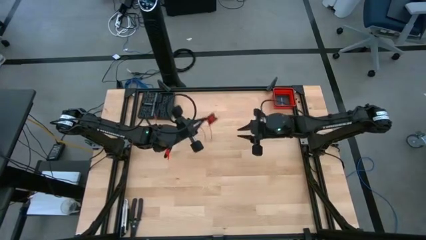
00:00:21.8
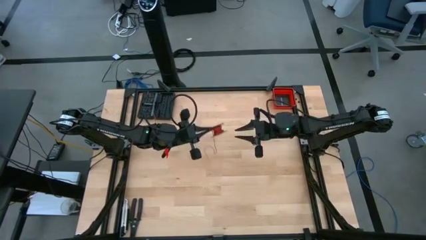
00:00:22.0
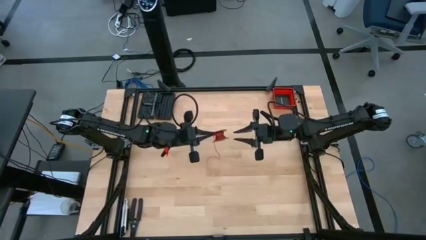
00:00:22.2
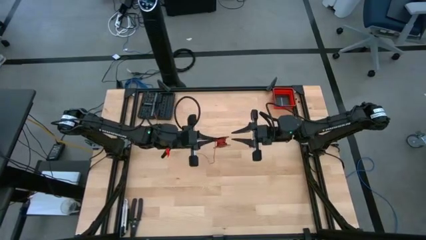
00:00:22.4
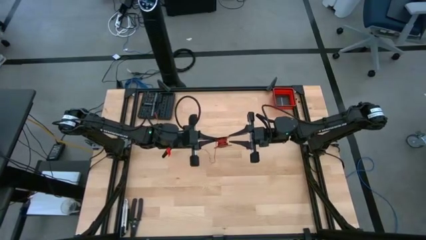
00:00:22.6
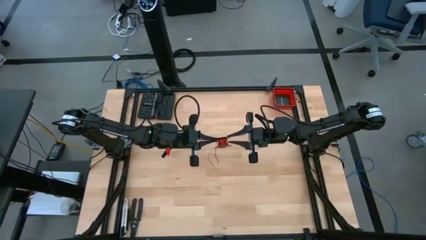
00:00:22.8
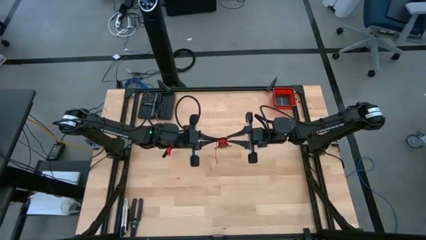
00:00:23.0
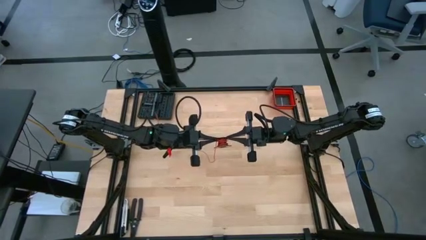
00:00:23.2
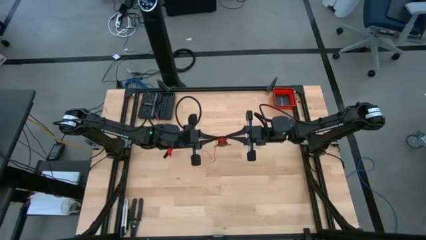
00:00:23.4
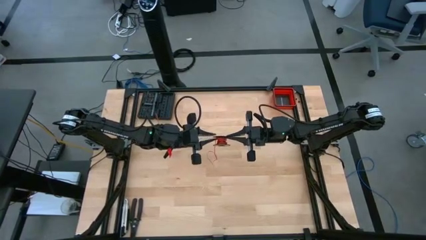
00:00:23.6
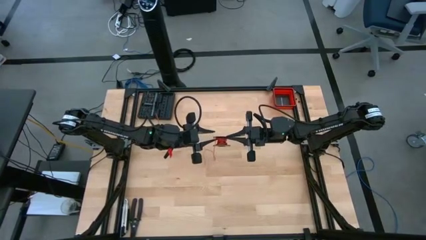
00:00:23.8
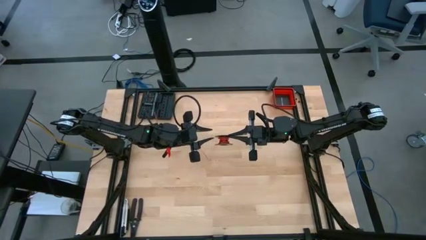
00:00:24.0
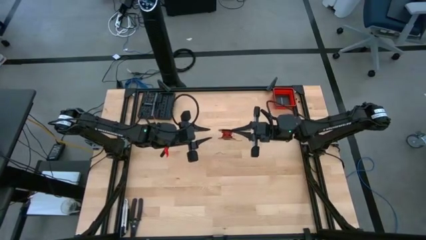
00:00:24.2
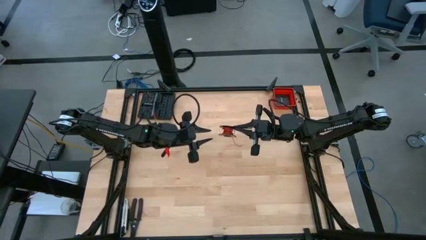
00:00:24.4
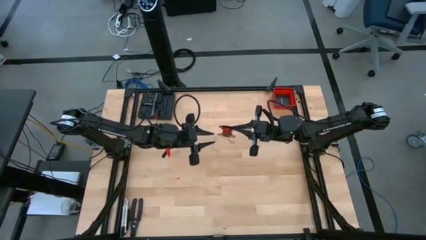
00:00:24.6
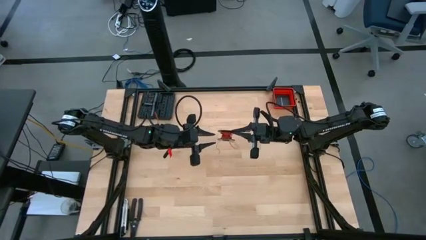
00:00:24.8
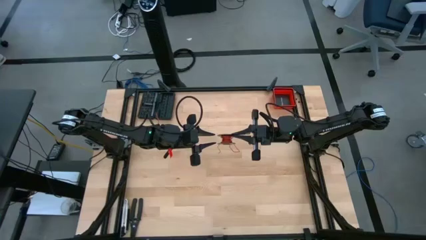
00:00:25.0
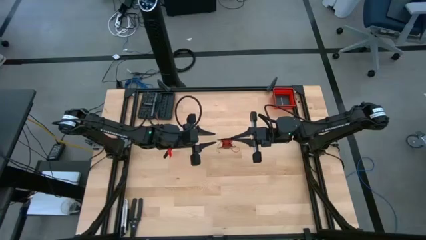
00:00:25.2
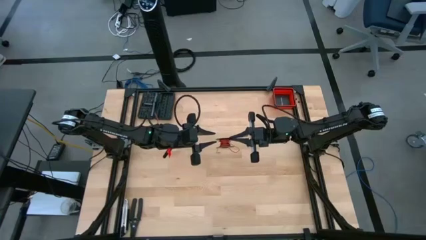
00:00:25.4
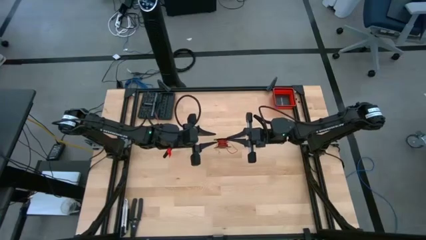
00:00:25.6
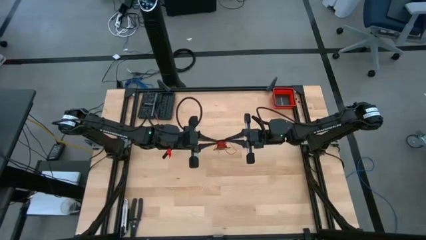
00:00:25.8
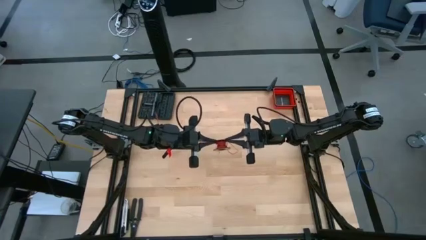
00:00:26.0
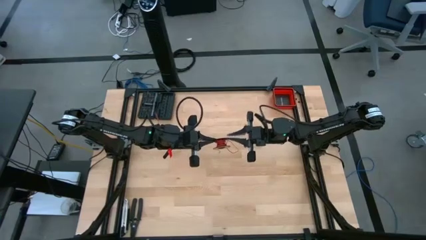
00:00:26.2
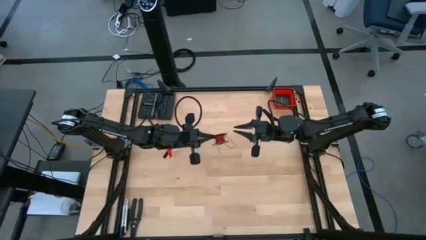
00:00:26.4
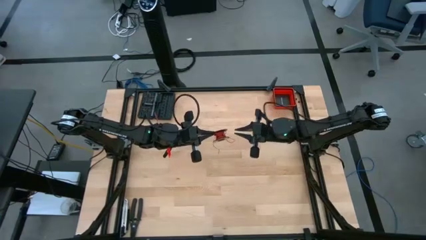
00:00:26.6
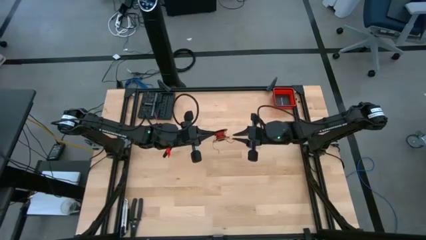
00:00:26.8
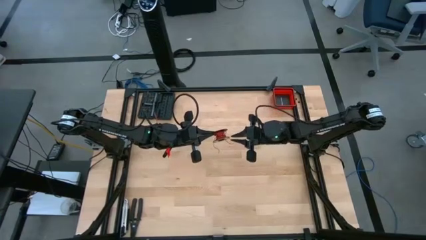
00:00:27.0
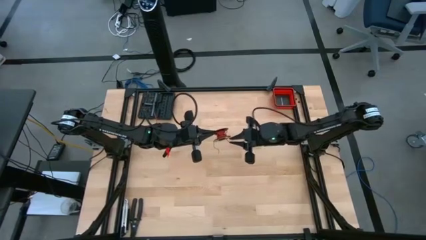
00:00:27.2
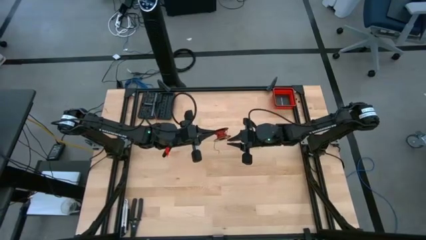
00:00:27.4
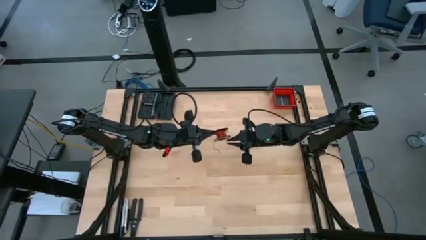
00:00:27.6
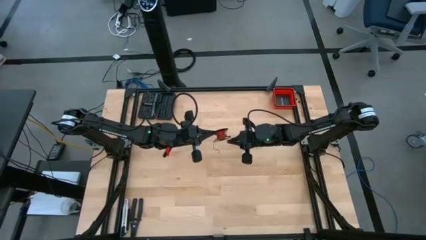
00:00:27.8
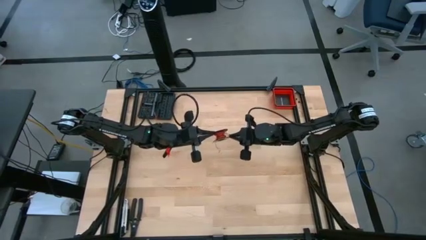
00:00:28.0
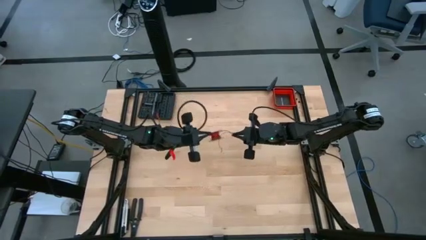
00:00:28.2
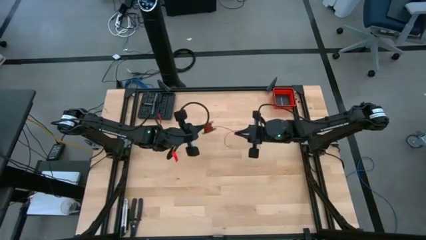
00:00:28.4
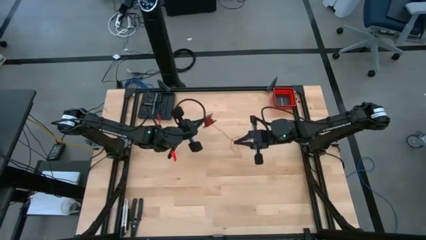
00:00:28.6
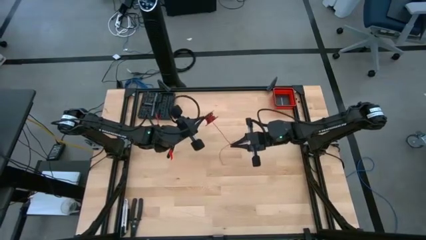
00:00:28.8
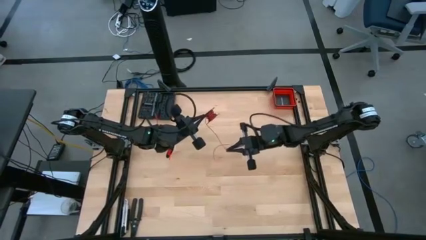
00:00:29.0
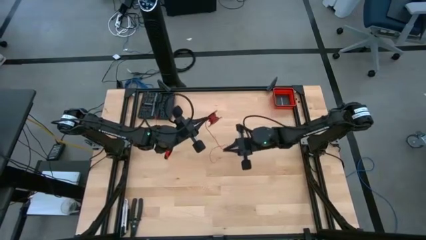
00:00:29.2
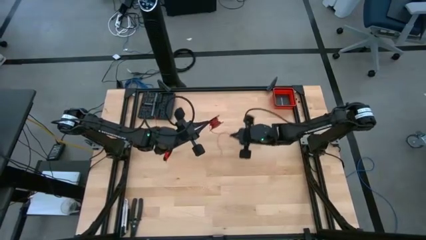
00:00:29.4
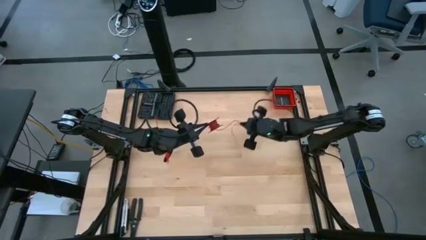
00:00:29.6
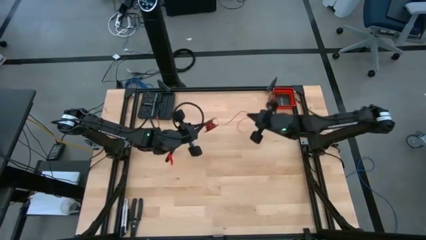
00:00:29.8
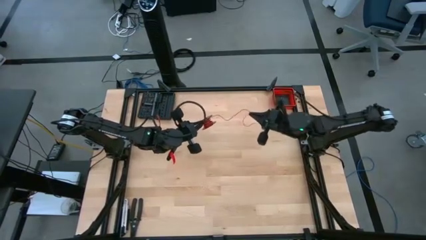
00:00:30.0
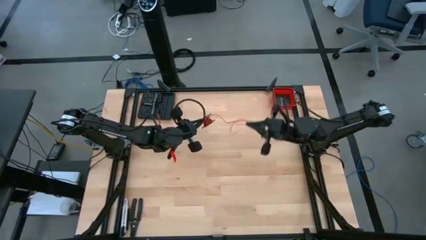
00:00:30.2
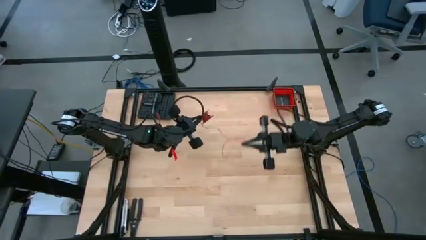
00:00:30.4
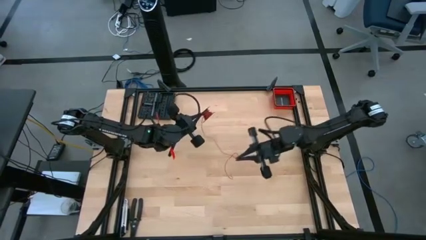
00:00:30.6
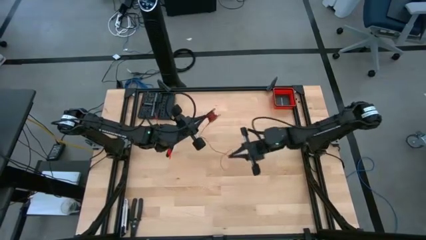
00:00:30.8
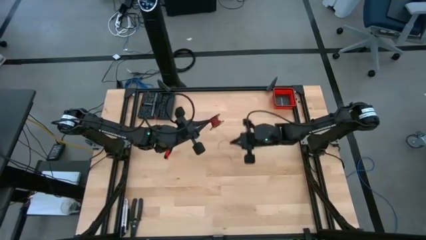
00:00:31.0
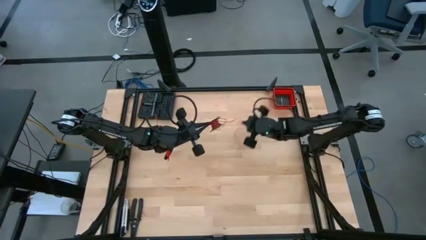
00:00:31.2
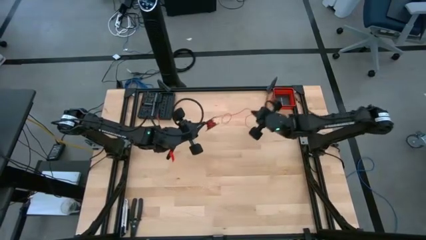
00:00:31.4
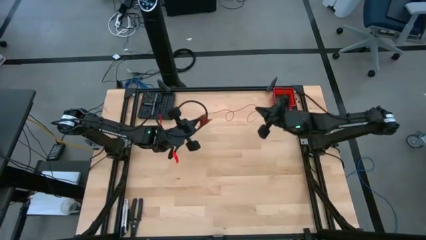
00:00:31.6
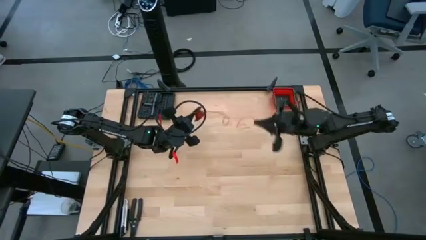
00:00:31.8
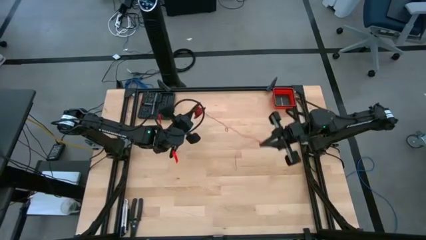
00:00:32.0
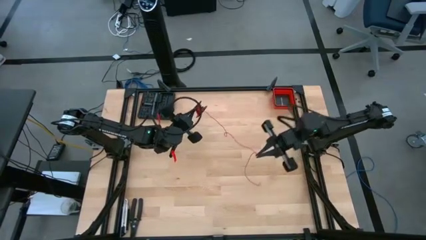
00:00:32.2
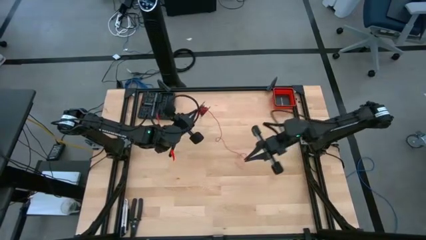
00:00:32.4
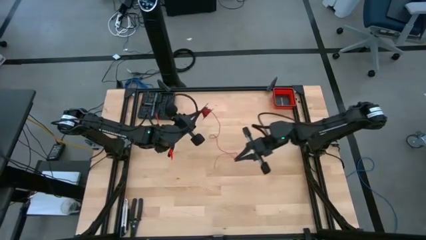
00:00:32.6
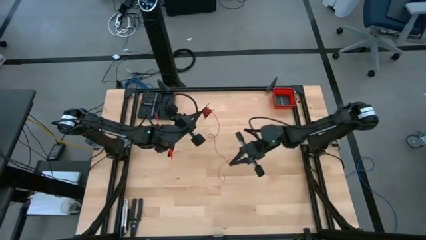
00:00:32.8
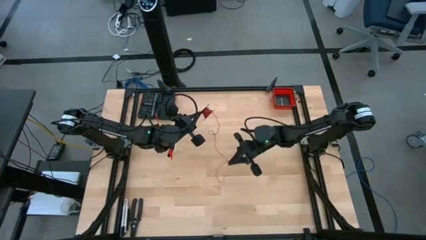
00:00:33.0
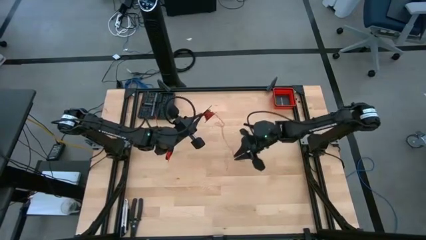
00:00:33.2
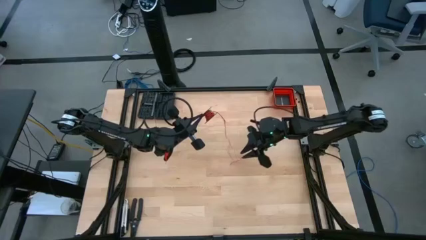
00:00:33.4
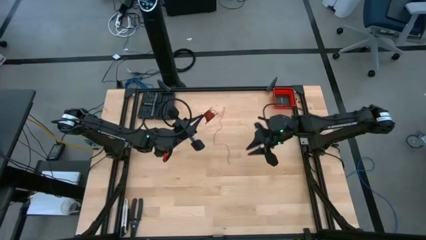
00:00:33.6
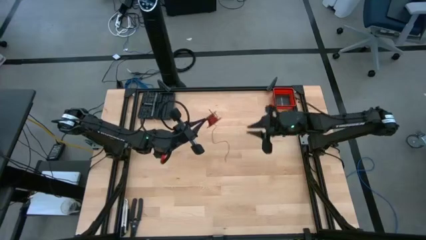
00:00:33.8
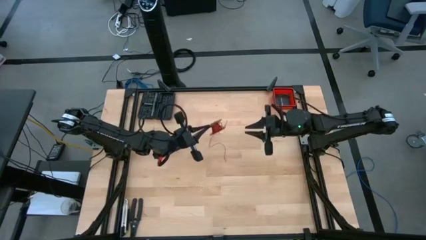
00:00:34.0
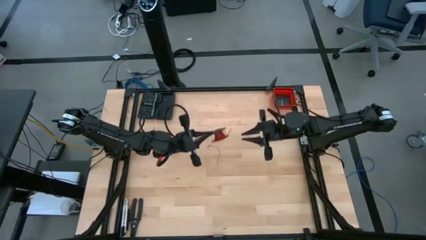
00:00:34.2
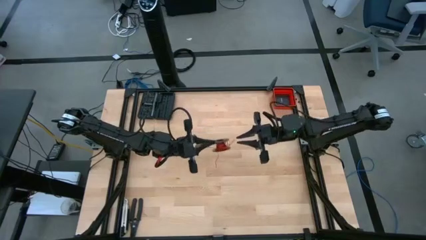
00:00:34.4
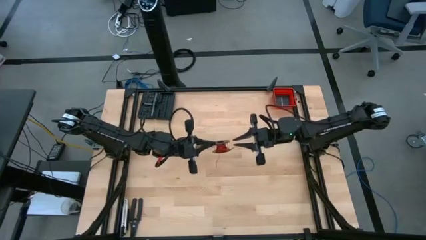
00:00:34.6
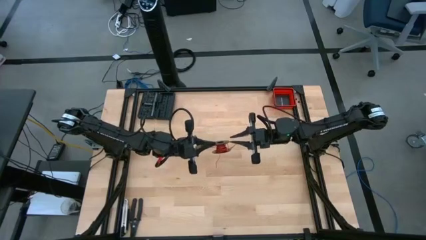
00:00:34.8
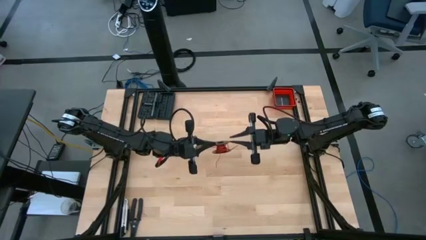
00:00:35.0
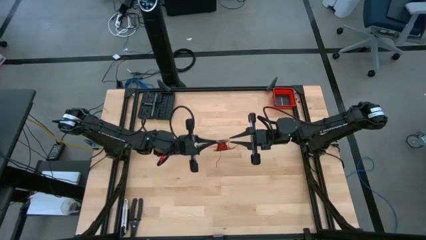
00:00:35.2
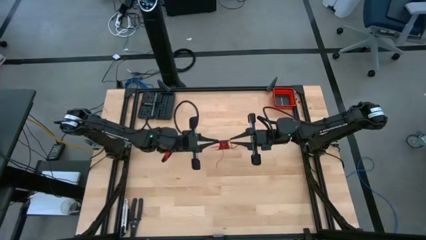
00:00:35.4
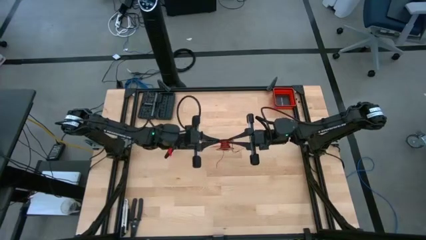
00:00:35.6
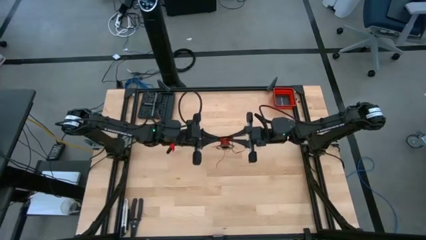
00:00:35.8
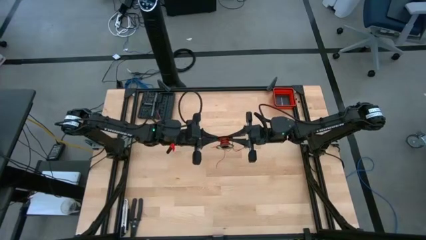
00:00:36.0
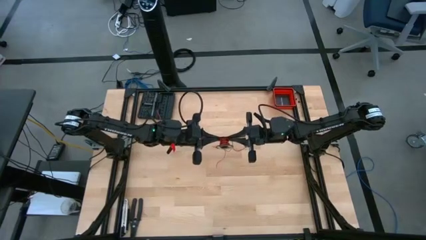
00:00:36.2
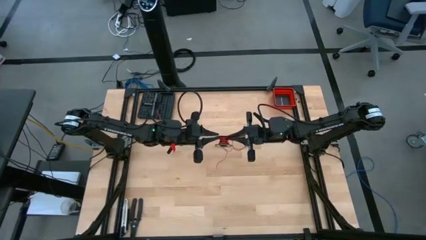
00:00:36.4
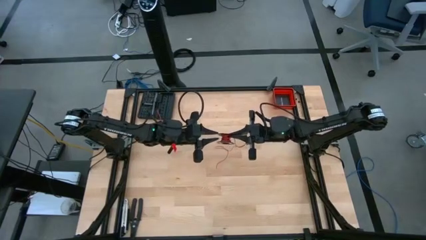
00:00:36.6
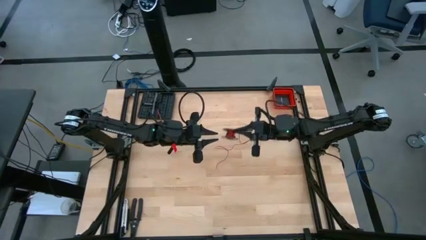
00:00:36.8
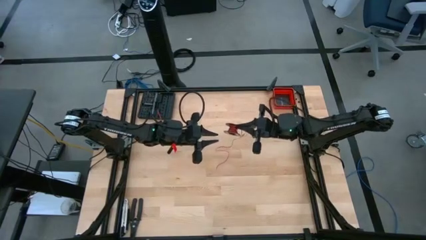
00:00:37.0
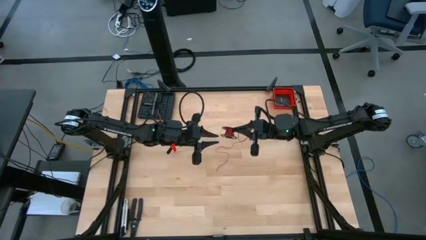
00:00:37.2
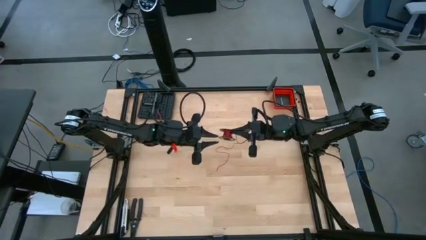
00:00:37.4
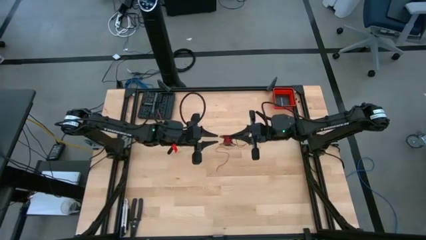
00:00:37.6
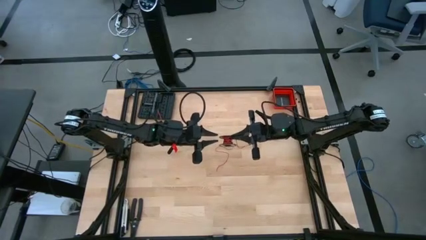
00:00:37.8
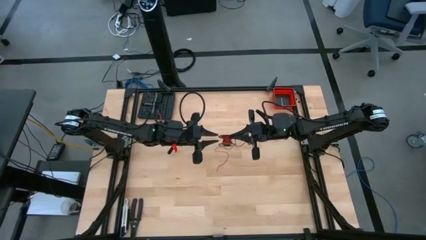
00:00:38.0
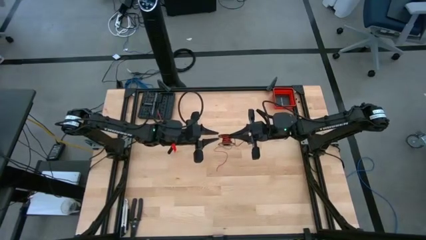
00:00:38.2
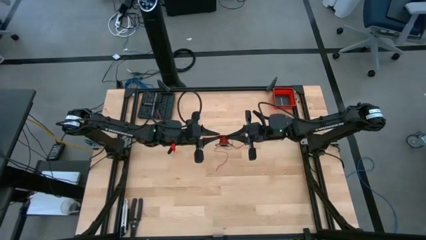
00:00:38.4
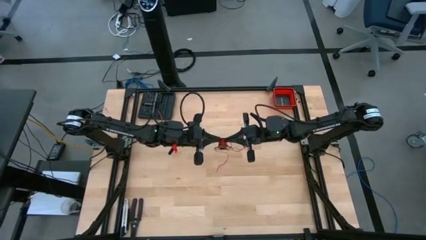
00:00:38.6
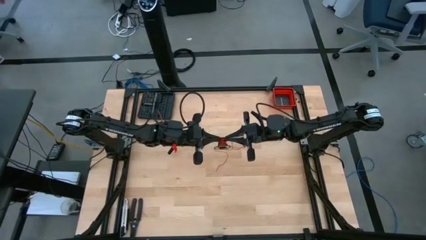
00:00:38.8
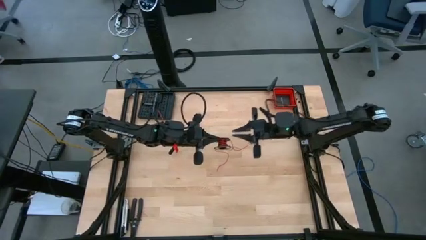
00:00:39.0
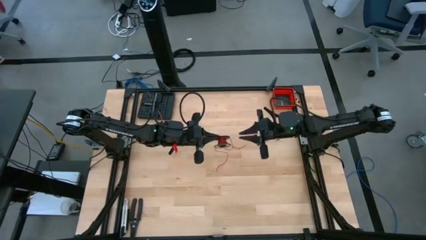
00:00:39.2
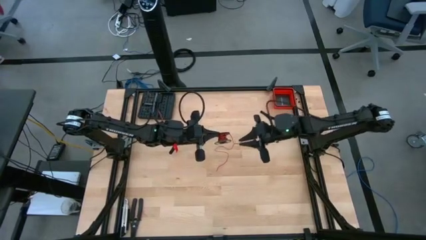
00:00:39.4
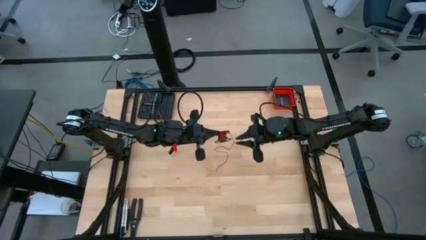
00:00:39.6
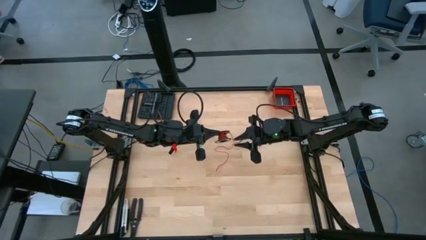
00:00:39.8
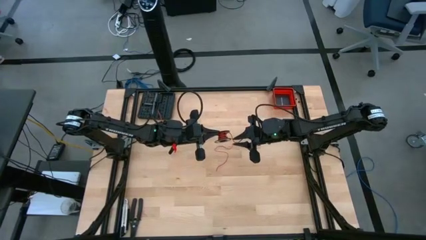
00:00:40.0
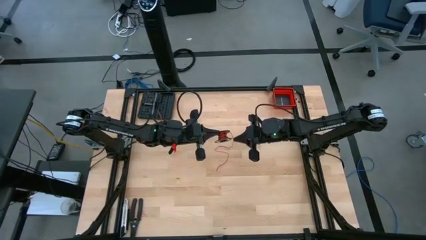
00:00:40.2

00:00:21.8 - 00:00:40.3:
Task: Coil cords
Uncoil the red wire from the black spool
